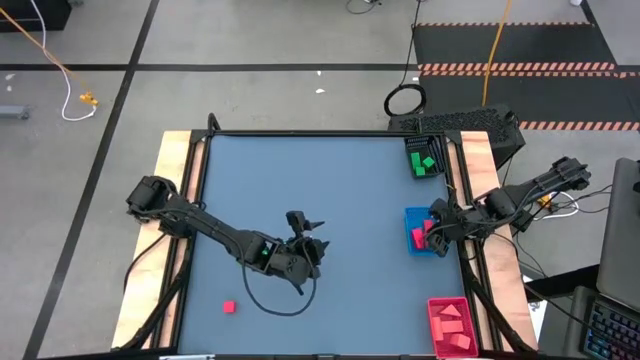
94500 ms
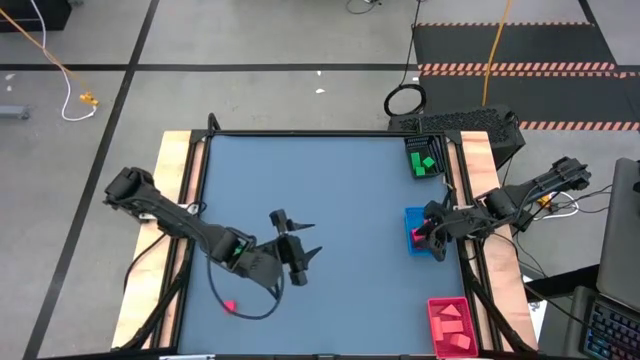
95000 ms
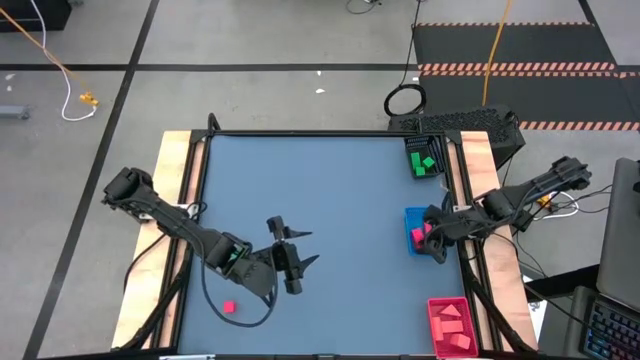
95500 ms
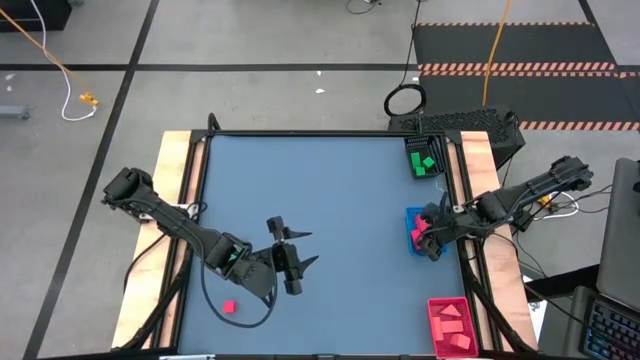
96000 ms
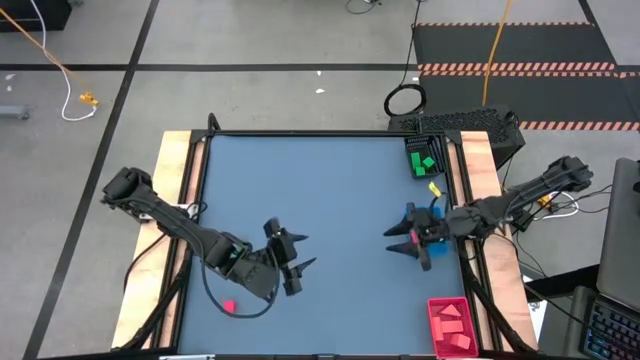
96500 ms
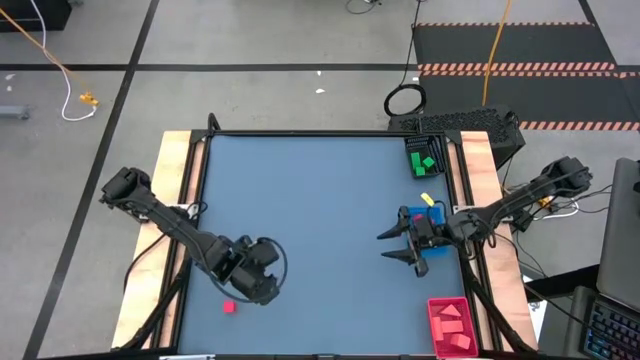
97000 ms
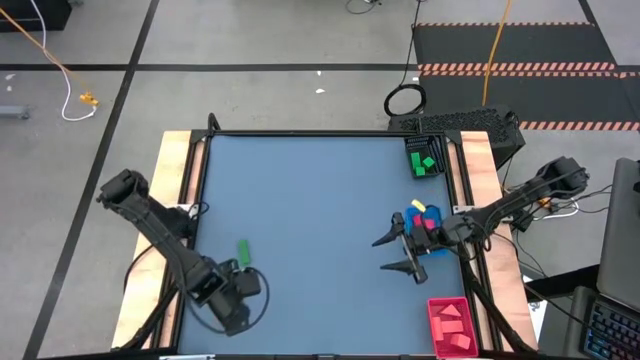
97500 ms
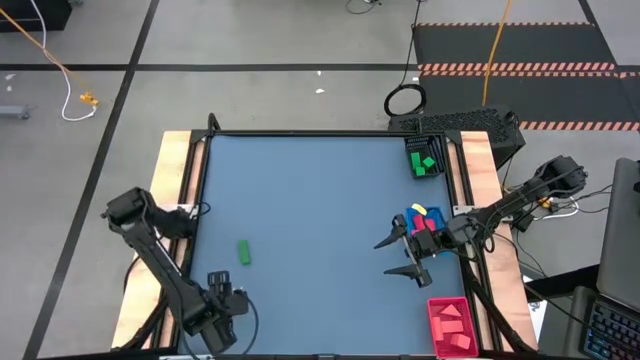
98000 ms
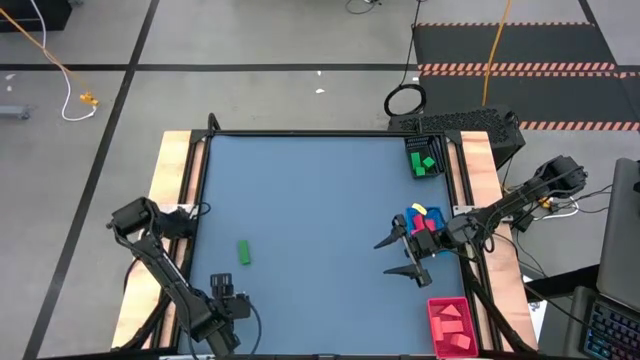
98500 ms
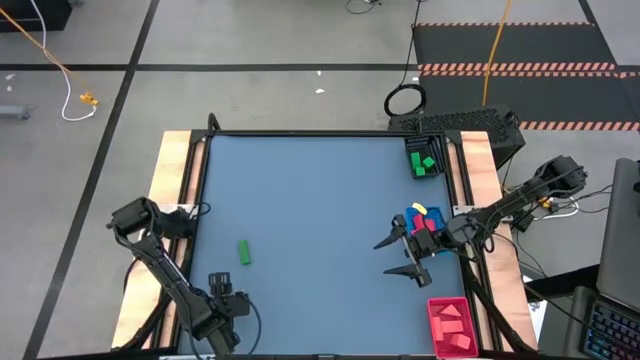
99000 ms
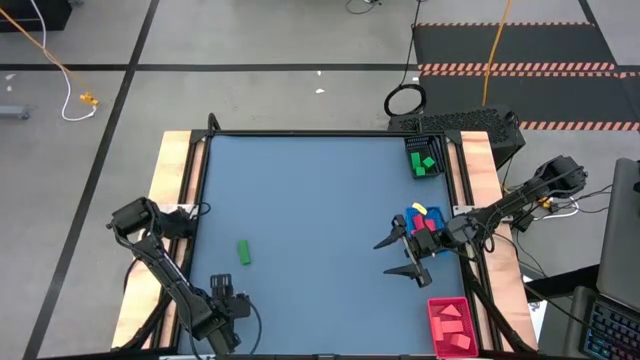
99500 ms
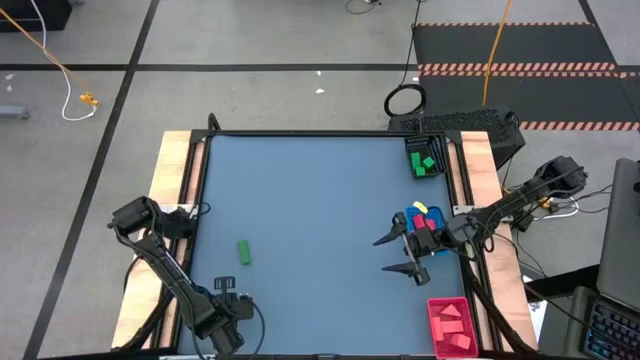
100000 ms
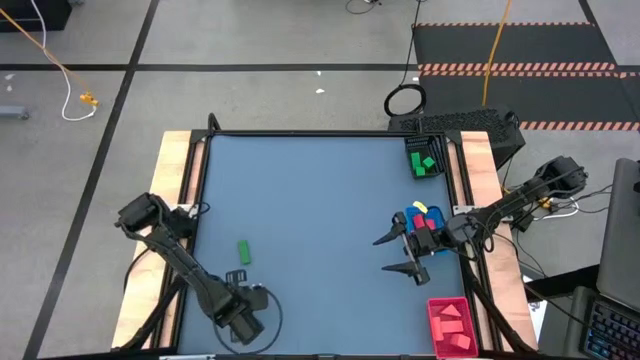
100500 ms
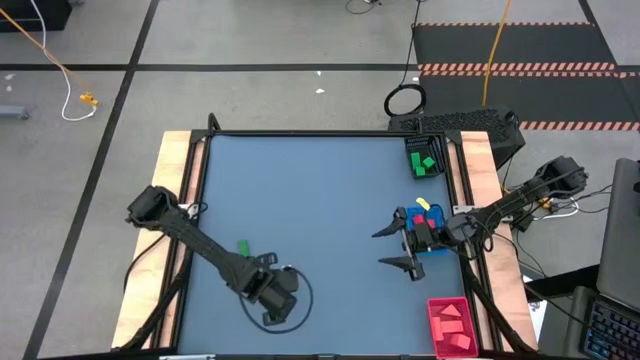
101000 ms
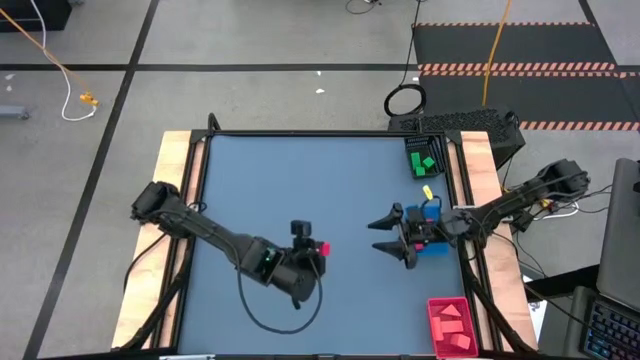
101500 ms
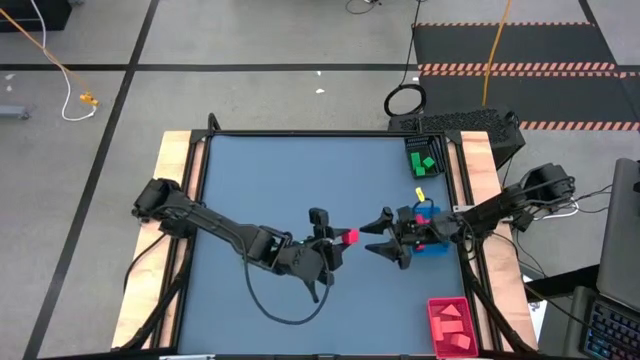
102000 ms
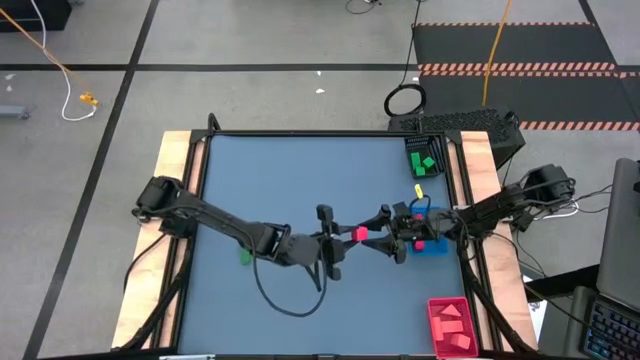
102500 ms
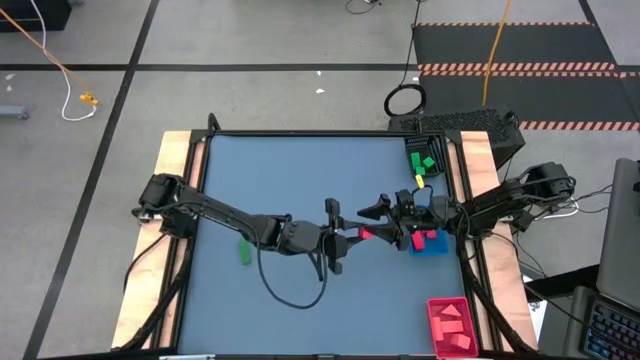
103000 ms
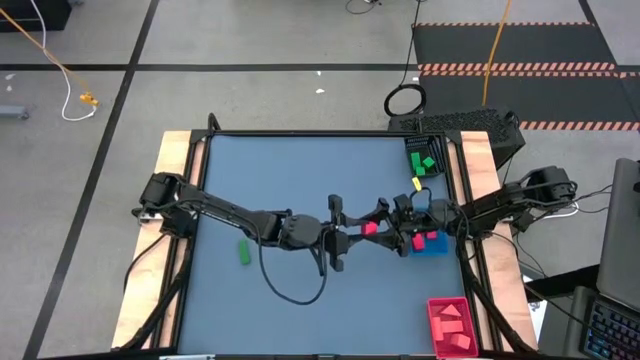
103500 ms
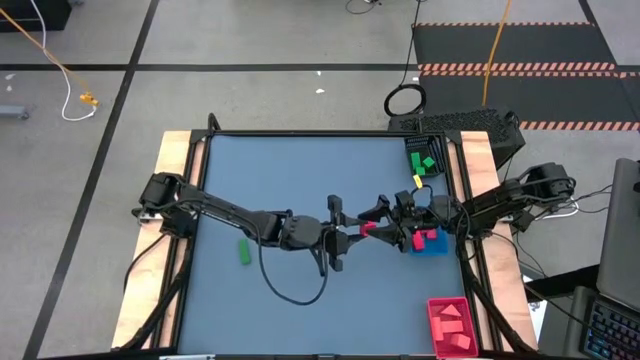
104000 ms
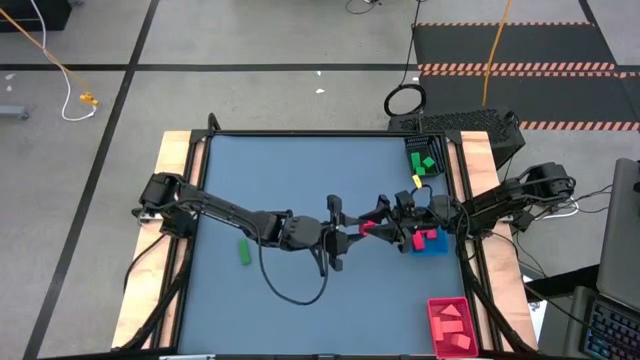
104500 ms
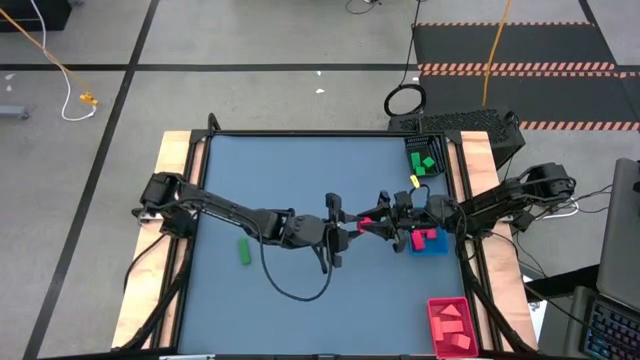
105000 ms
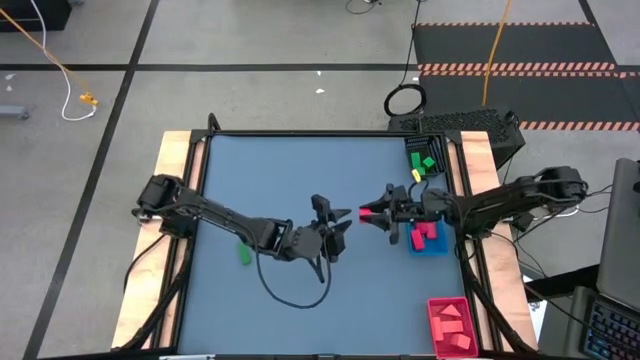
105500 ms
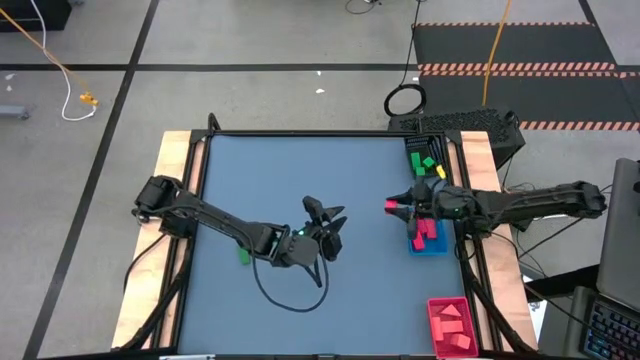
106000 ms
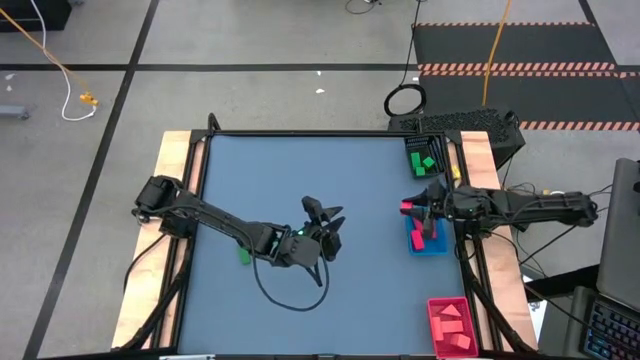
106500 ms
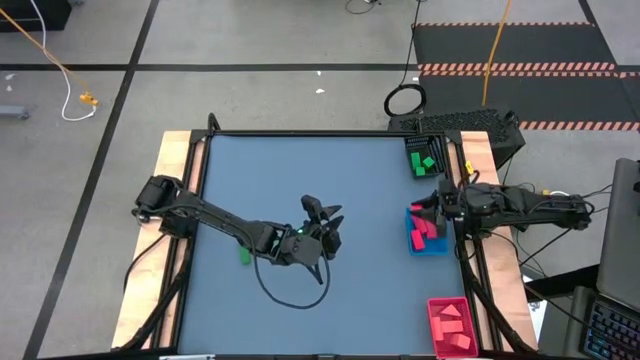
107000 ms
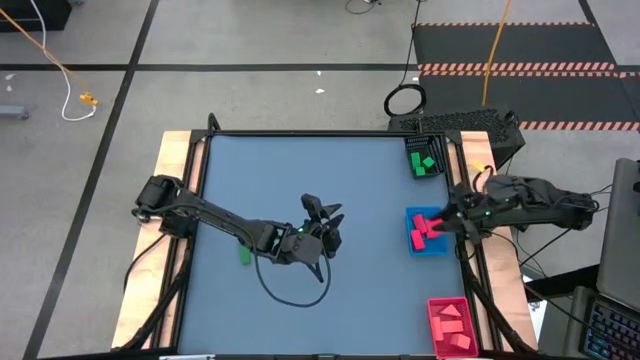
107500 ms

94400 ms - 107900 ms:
Task: Sort & place blocks by color
Put the red block into the blue bin

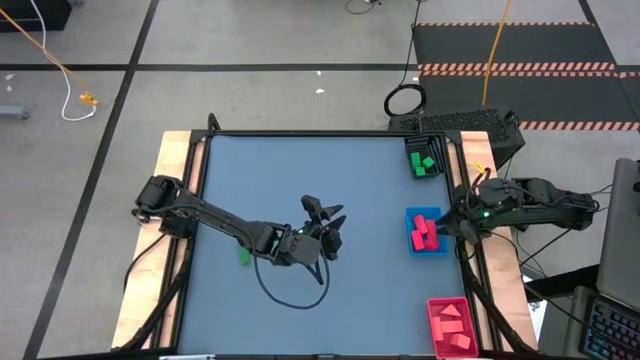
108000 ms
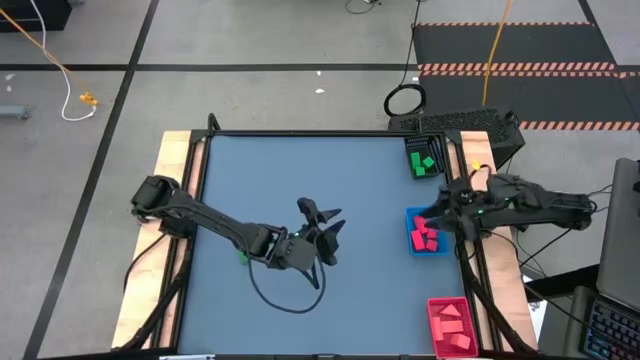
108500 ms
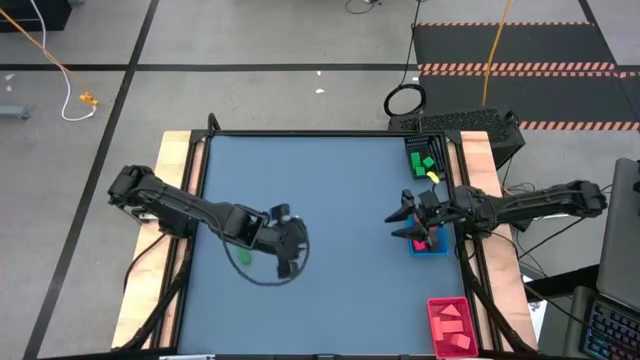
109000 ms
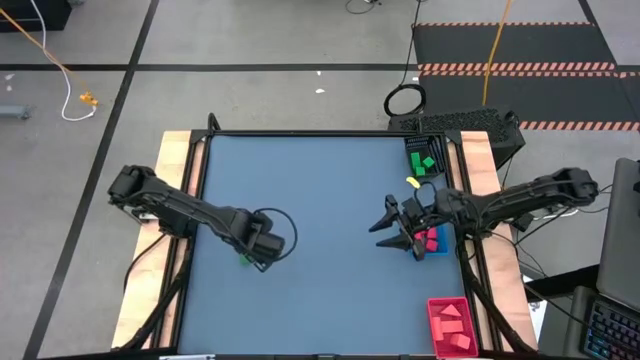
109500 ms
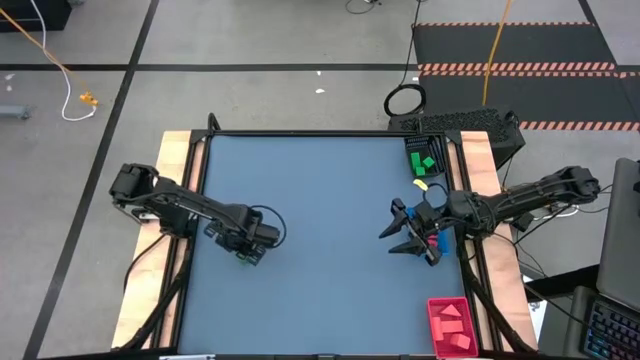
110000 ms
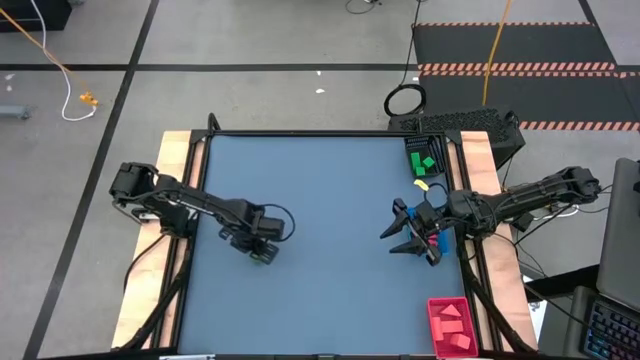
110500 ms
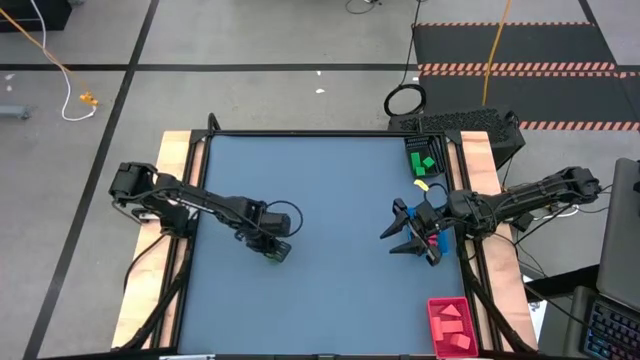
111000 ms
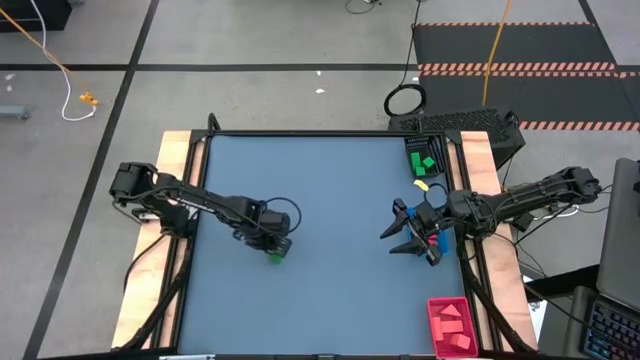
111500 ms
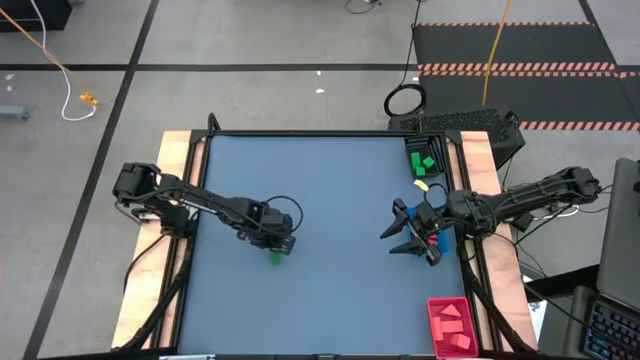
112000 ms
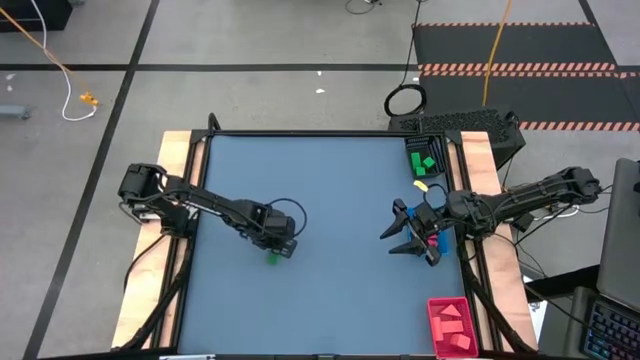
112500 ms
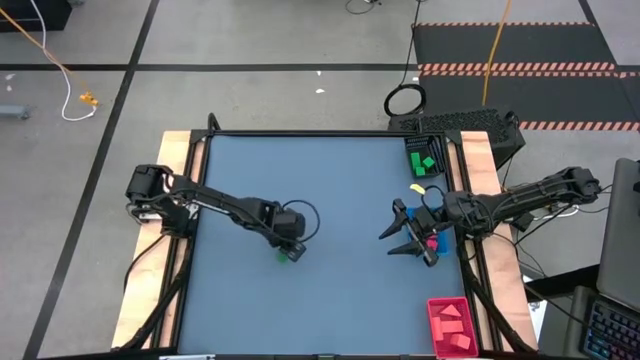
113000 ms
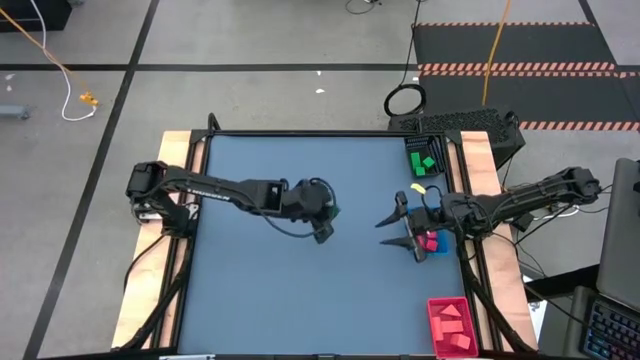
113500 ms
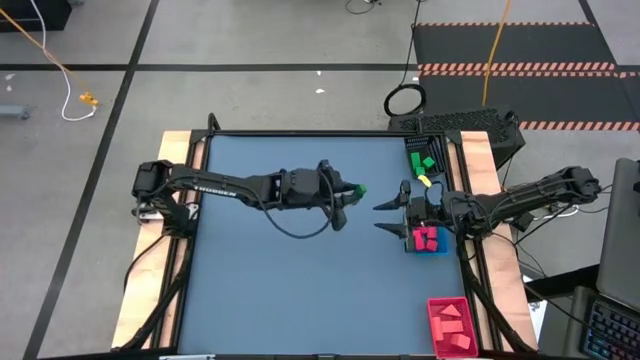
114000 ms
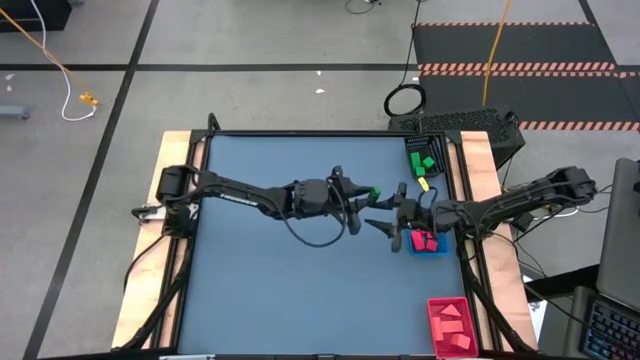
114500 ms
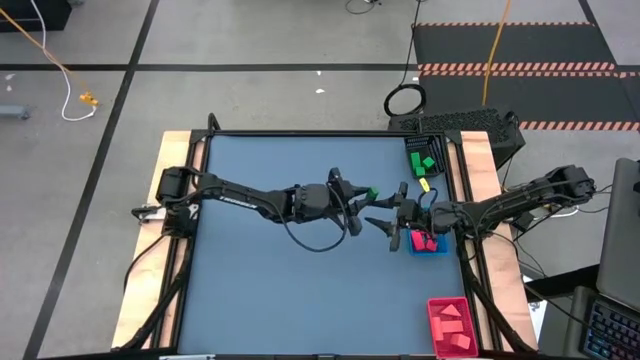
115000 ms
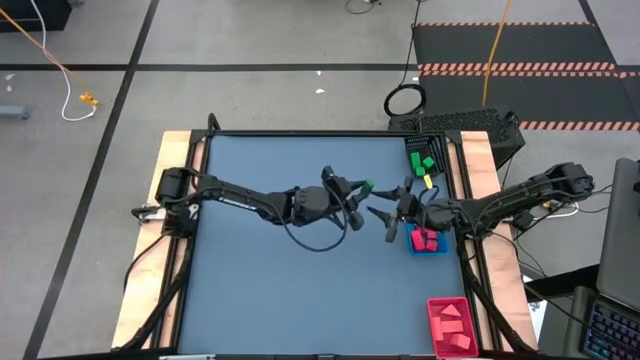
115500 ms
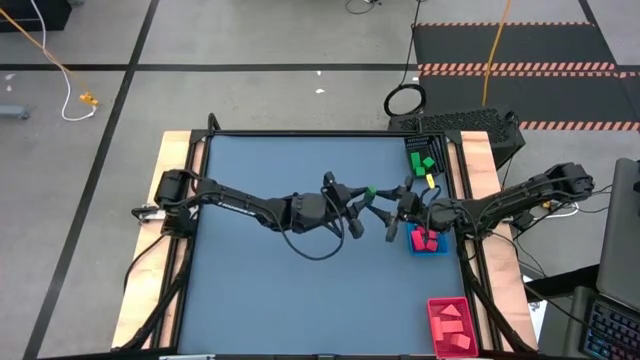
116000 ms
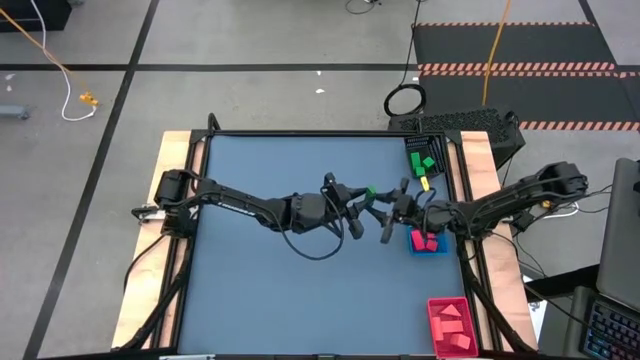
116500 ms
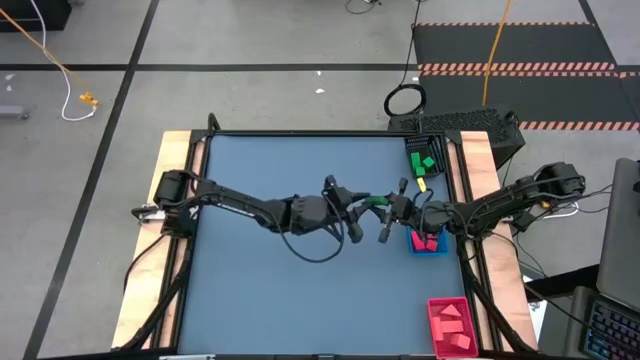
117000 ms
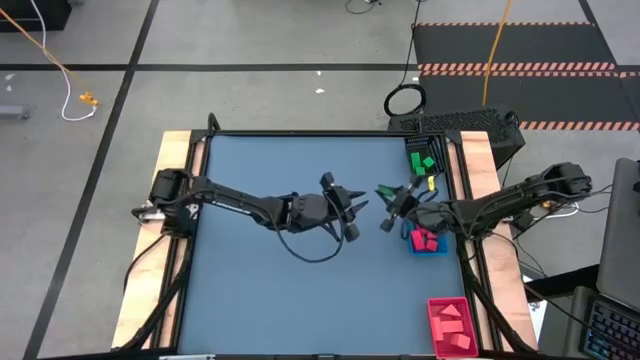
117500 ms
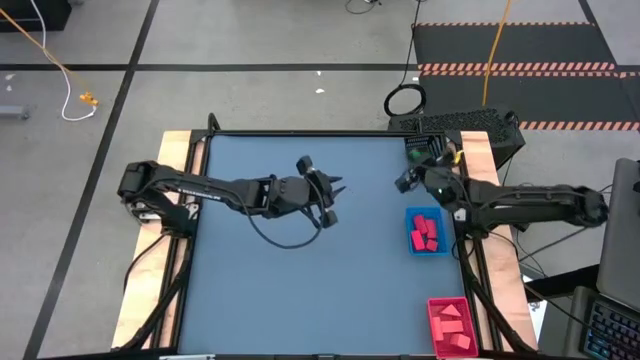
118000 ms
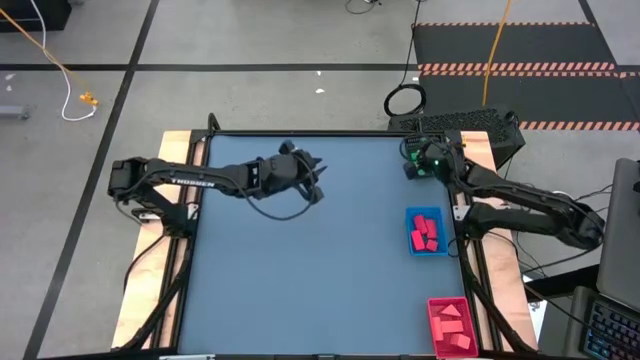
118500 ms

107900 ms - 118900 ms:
Put the green block into the black bin
